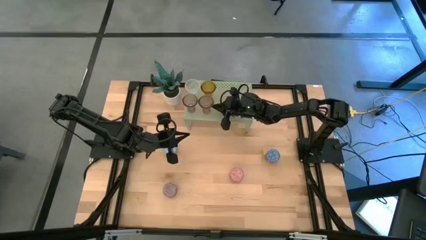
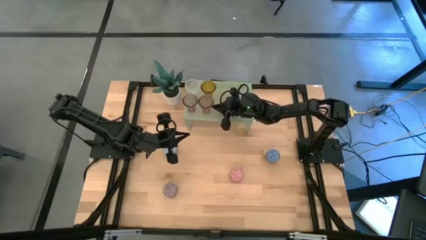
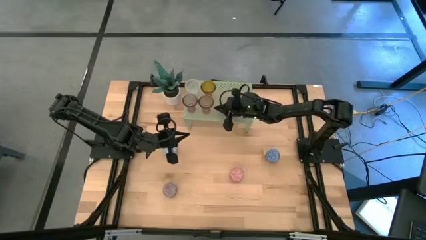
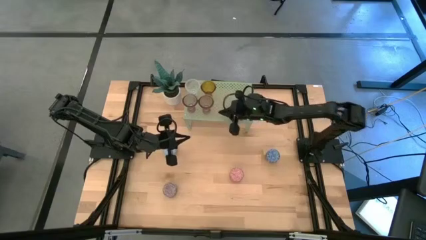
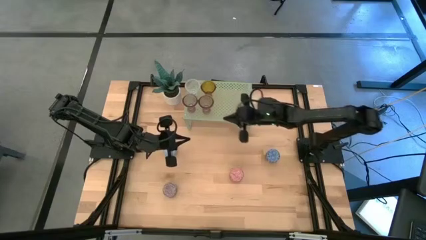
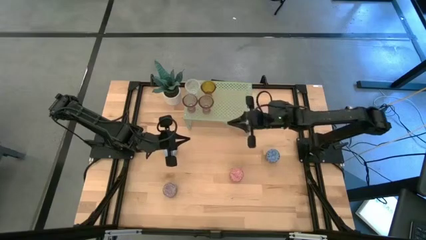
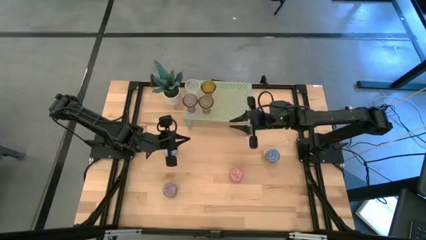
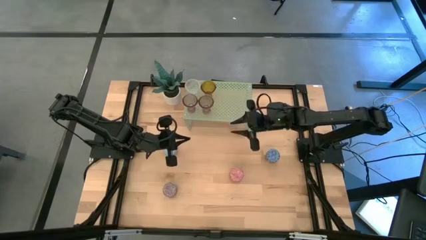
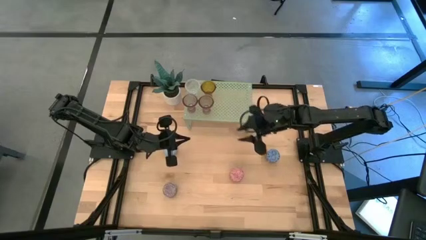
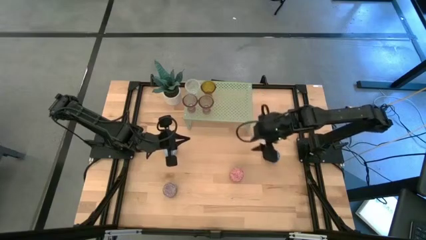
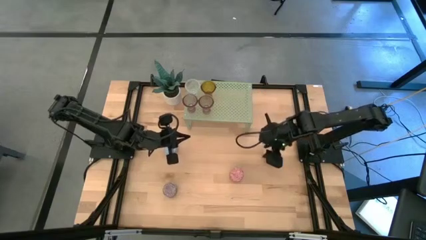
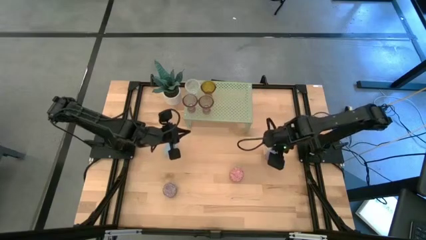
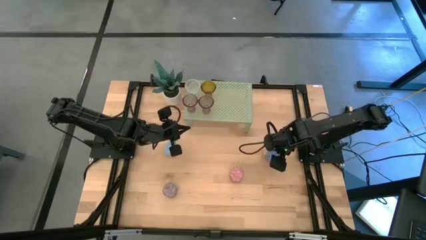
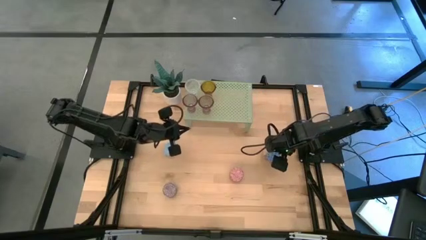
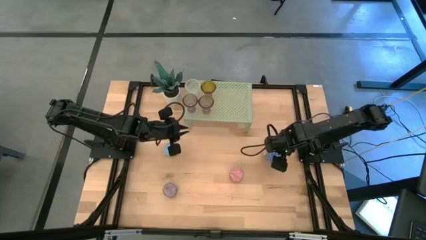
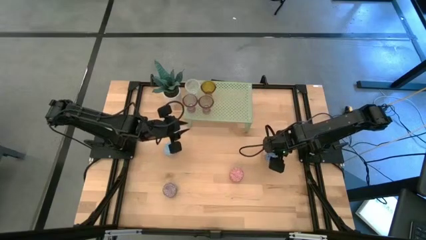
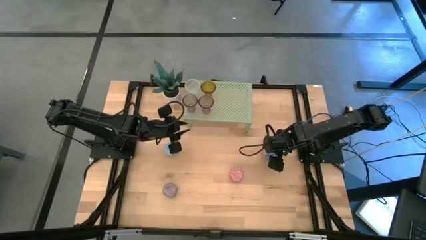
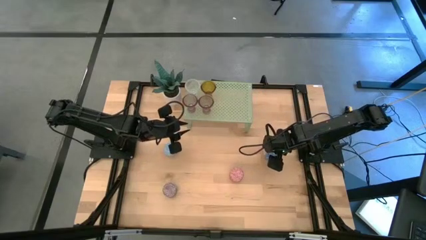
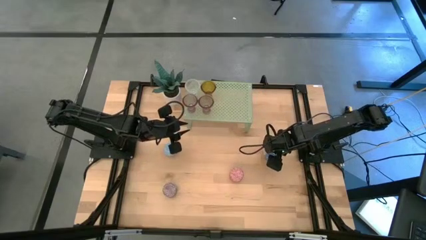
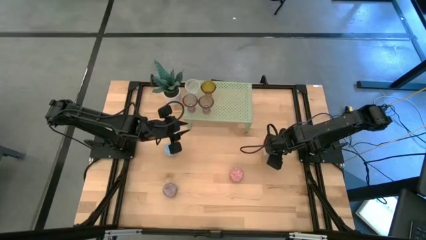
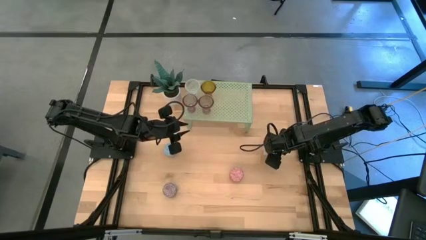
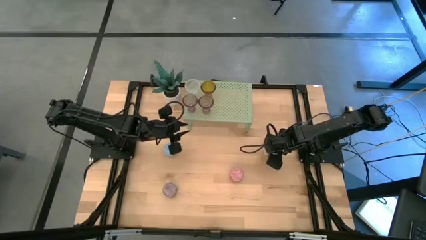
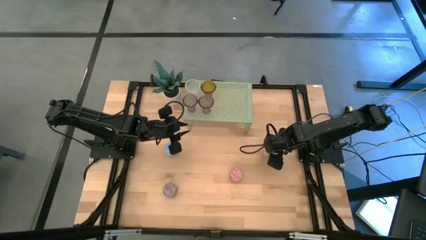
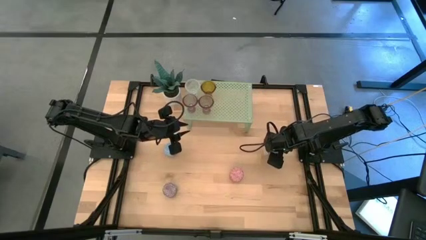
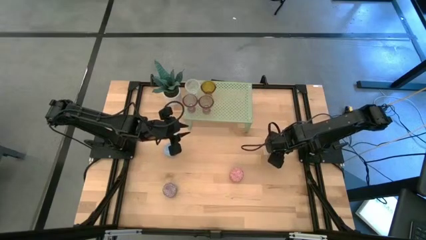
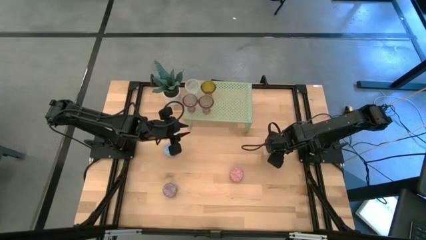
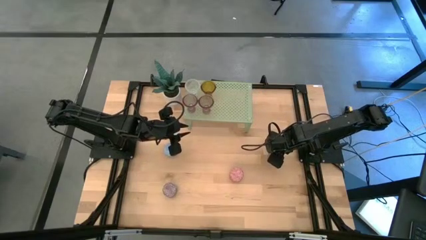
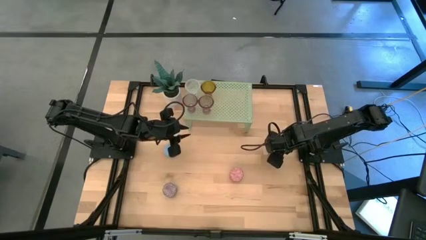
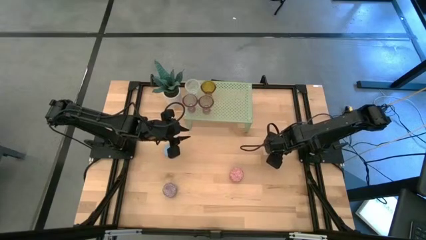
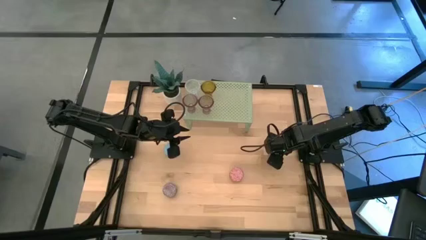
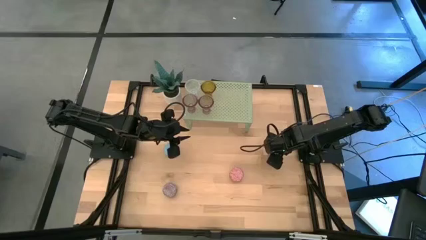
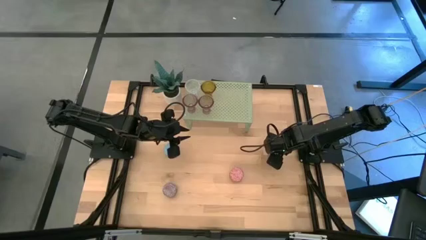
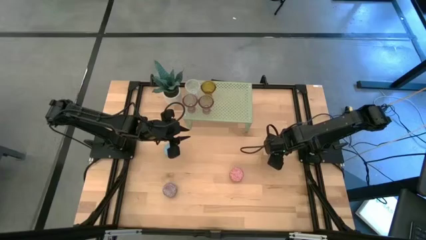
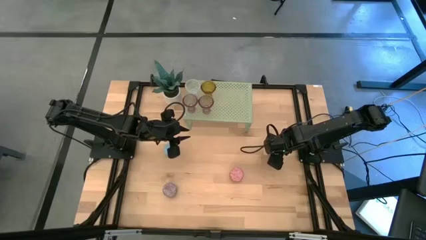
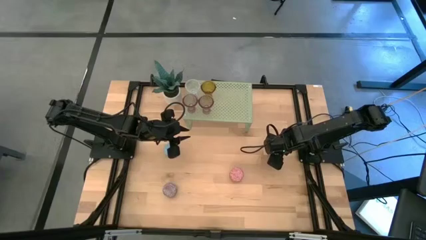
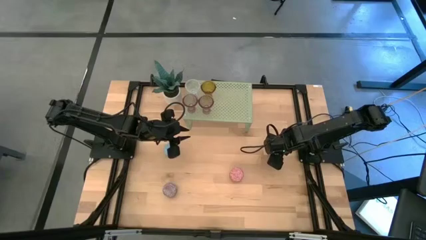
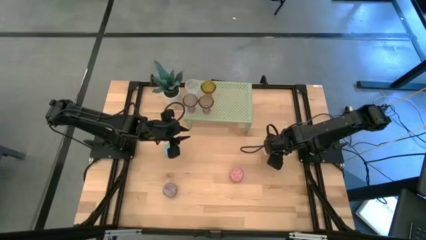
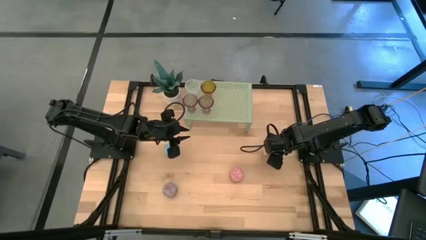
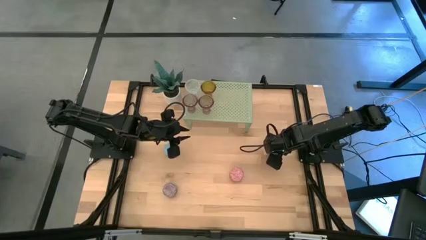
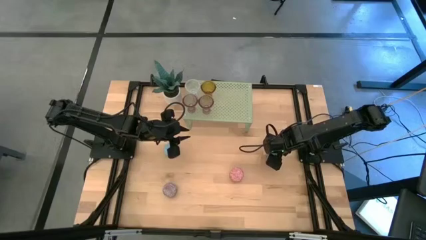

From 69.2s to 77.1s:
Task: Pick & Place candle stick holders
Put the blue scented candle on the shelf

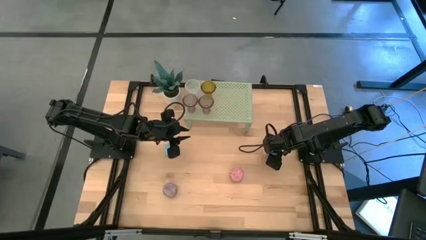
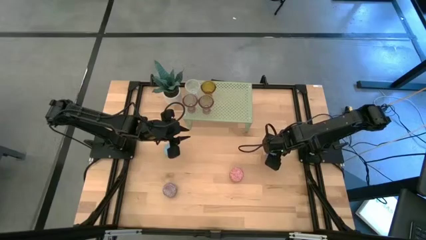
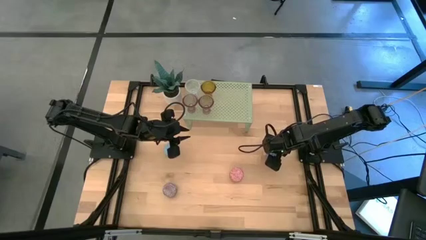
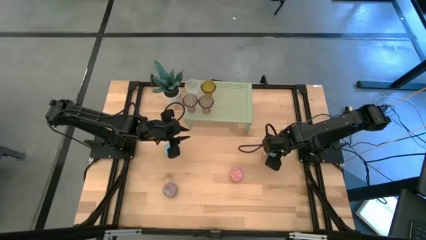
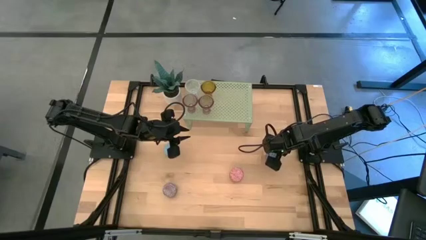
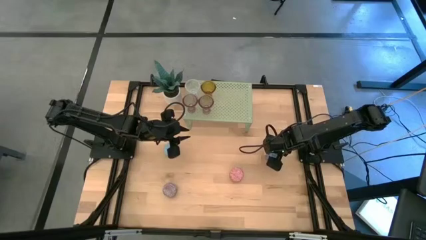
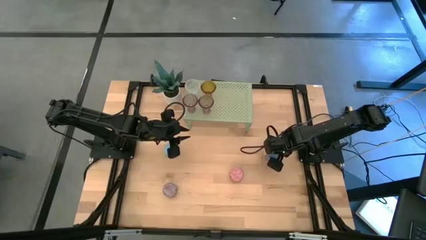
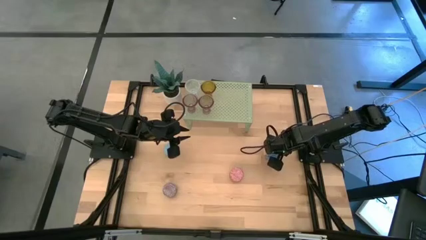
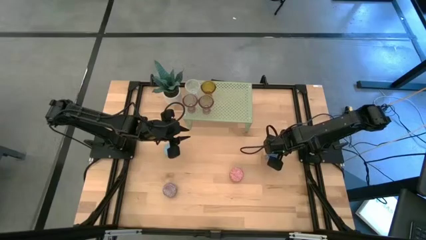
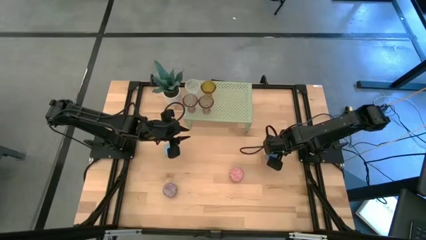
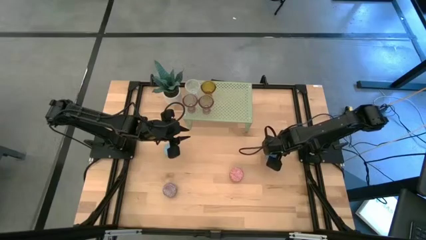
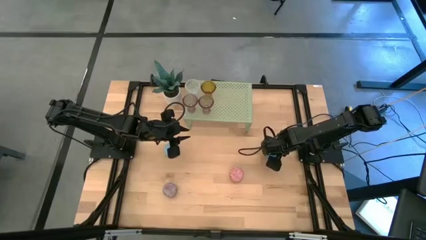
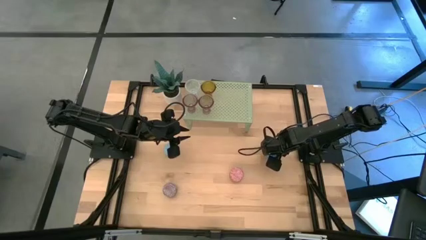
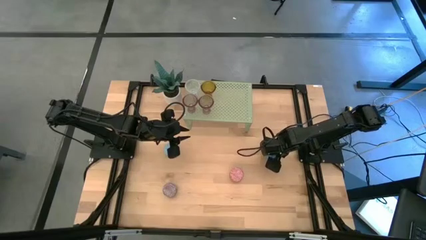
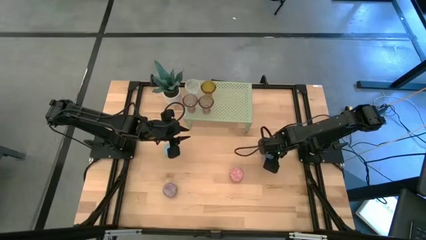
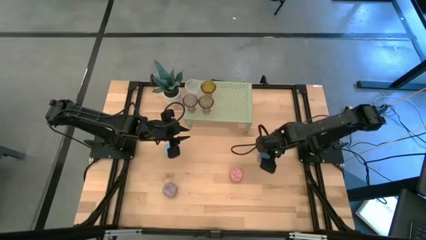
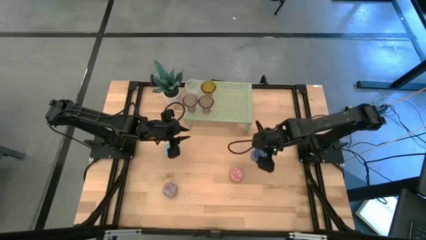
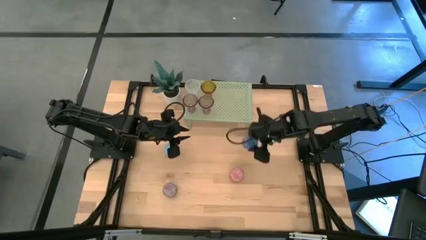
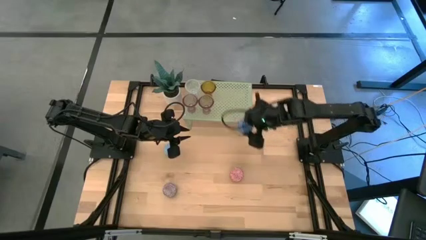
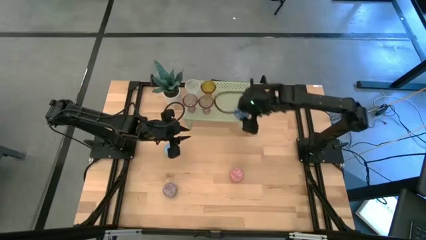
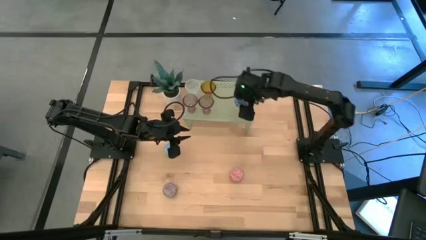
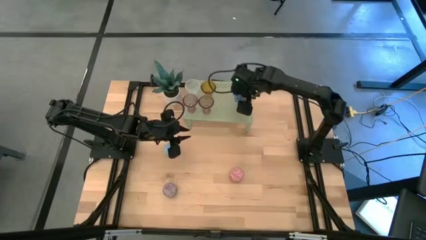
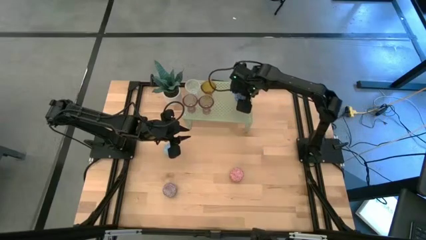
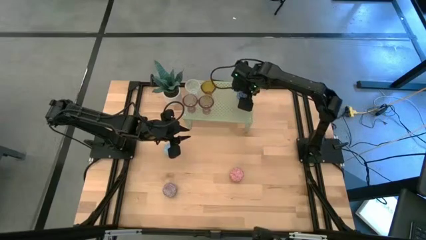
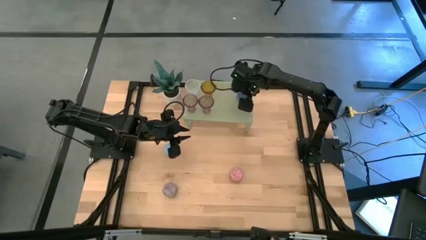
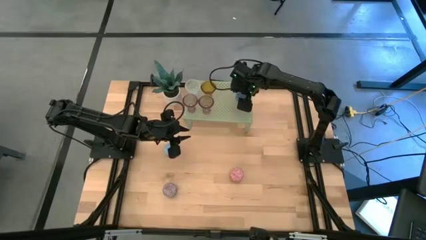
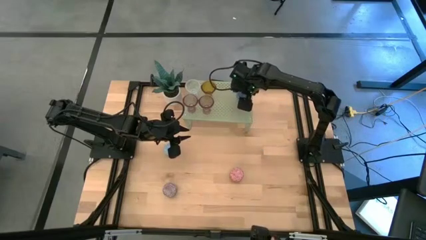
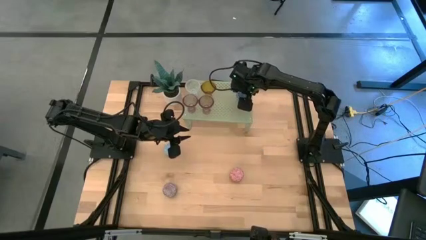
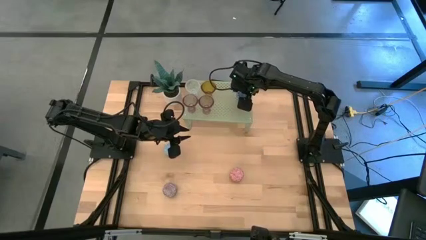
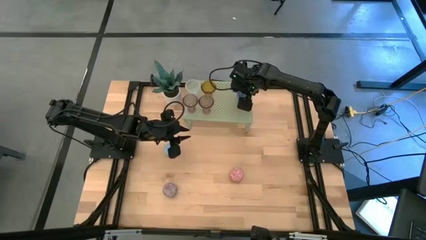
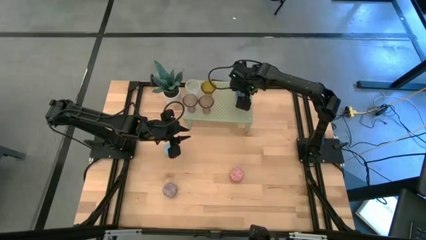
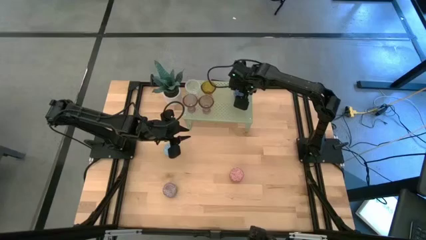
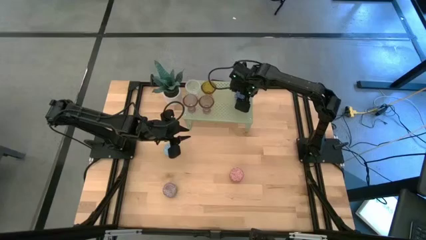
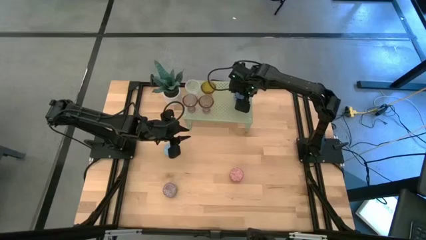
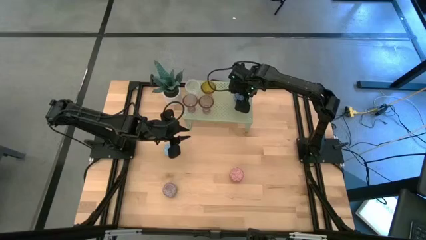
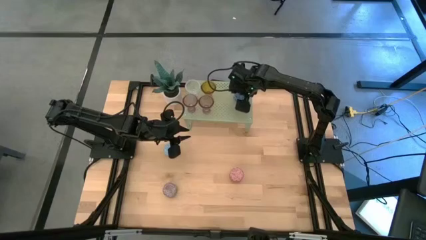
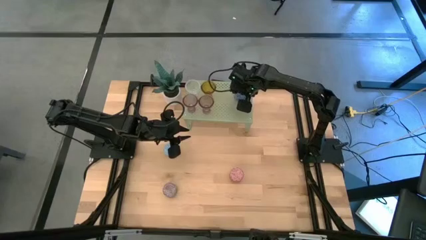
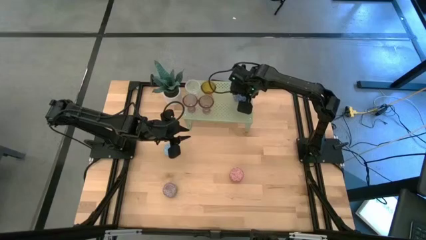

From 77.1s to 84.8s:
Put the blue scented candle on the shelf

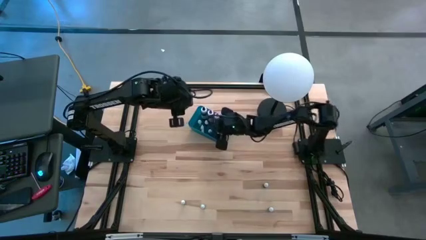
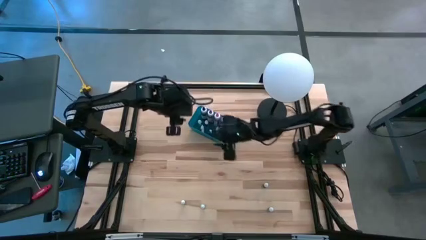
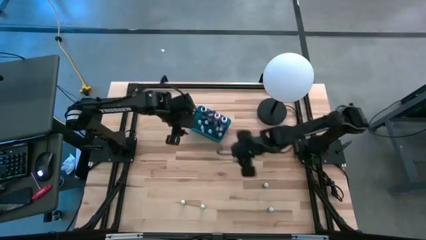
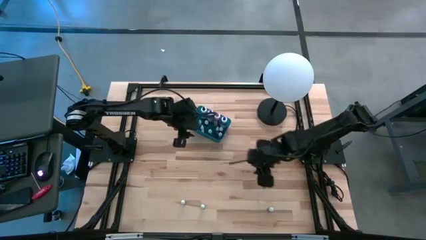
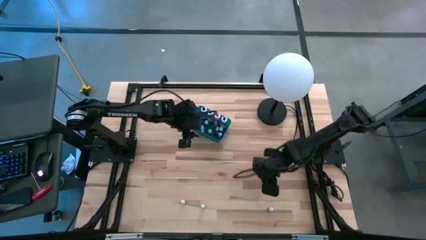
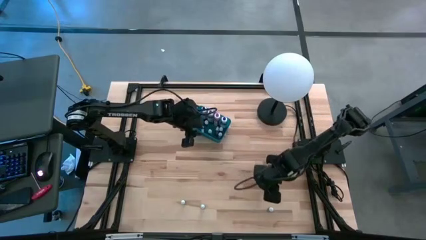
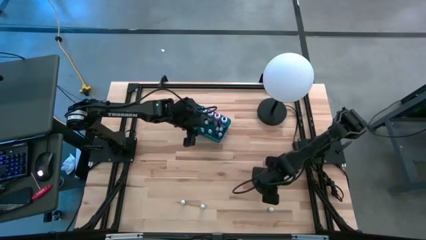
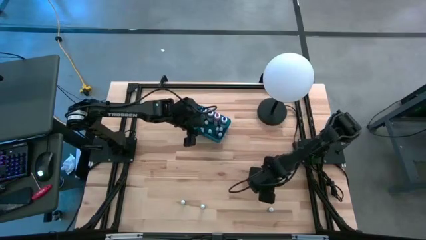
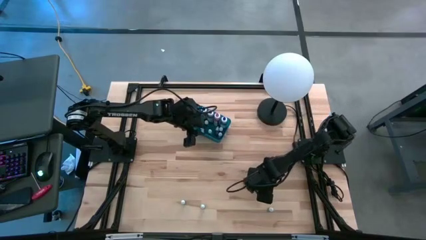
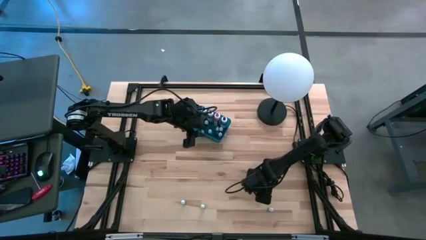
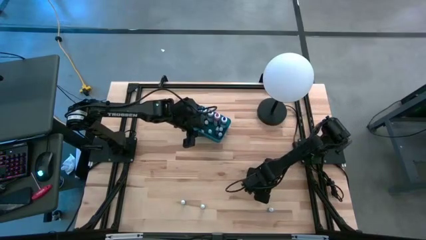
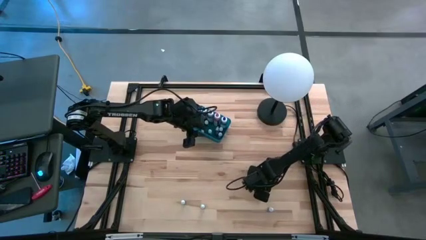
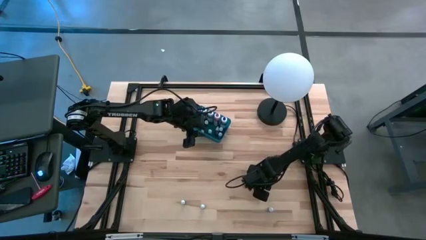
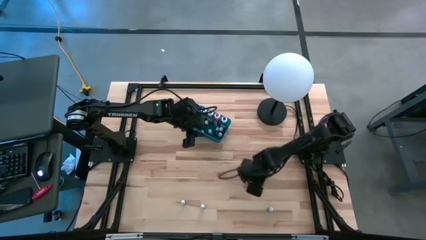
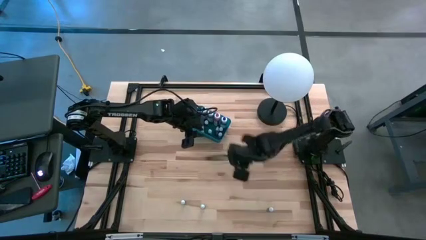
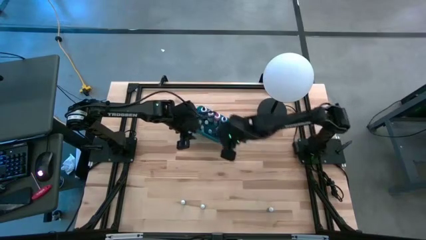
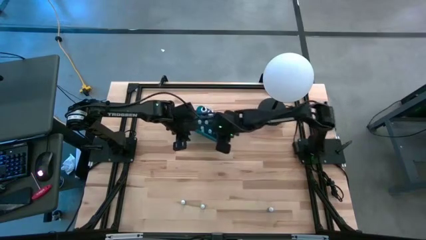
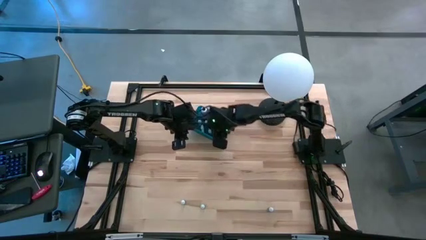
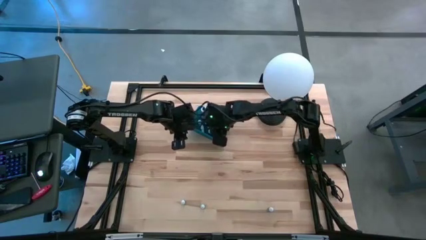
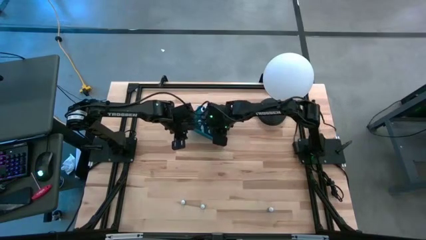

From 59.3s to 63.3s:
Task: Pick & Place food coloring
Put the small purple food coloring bottle into the blue bin
